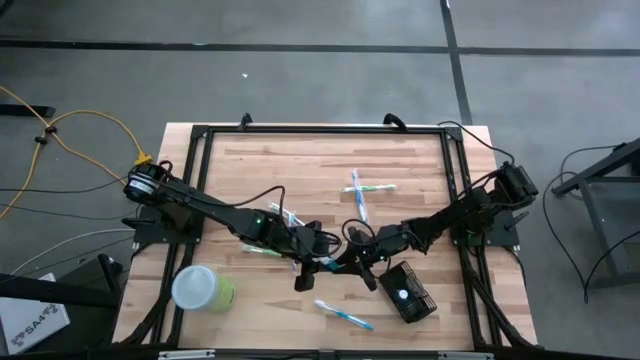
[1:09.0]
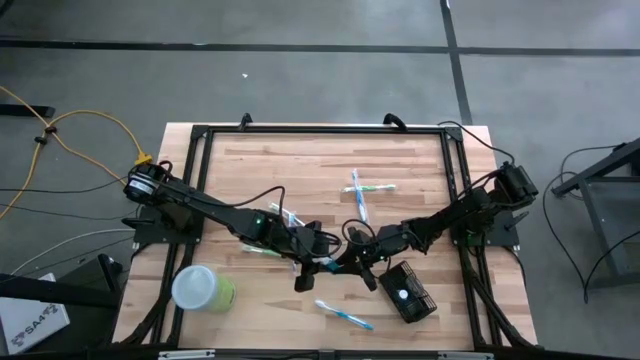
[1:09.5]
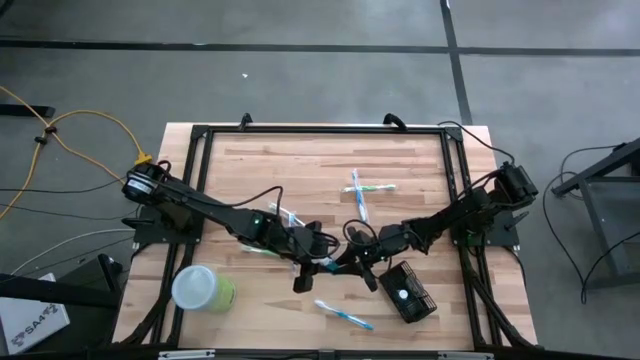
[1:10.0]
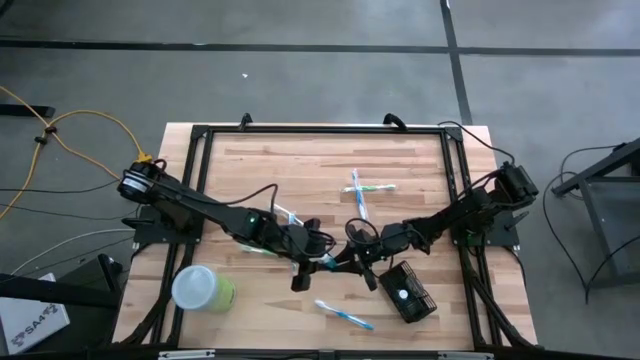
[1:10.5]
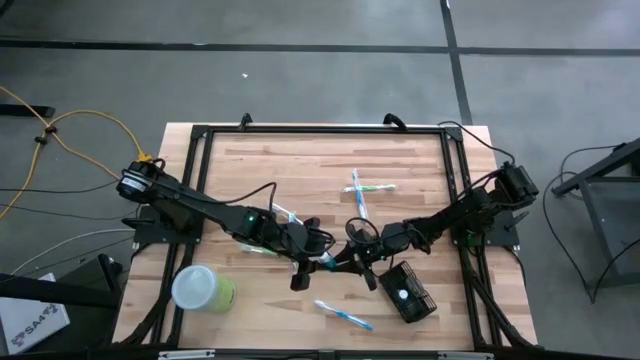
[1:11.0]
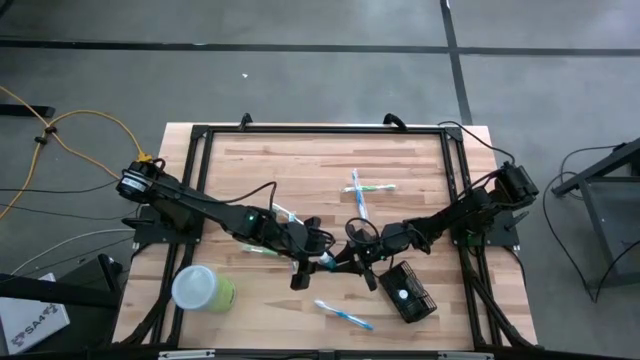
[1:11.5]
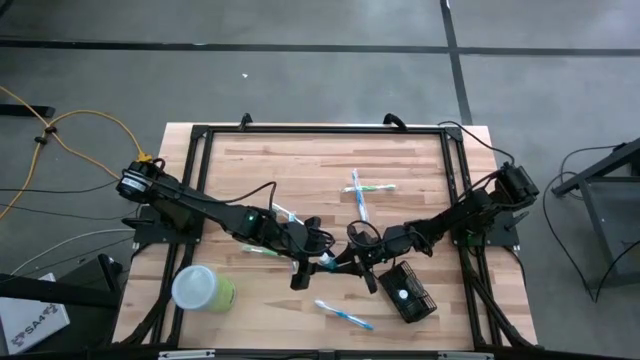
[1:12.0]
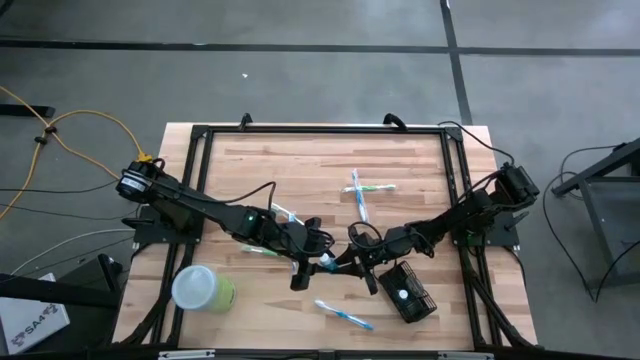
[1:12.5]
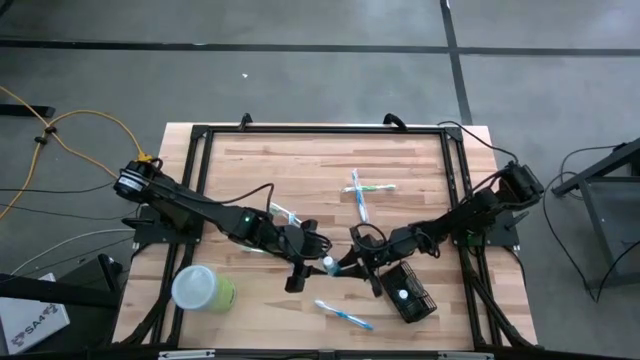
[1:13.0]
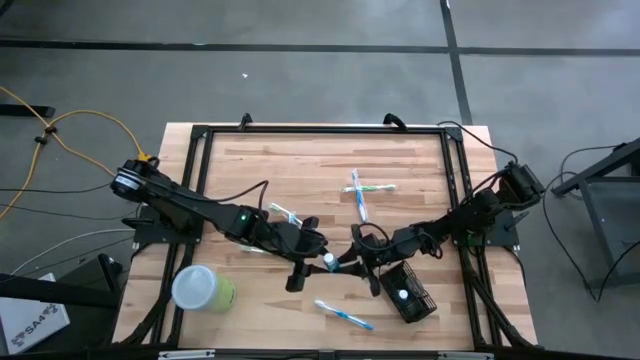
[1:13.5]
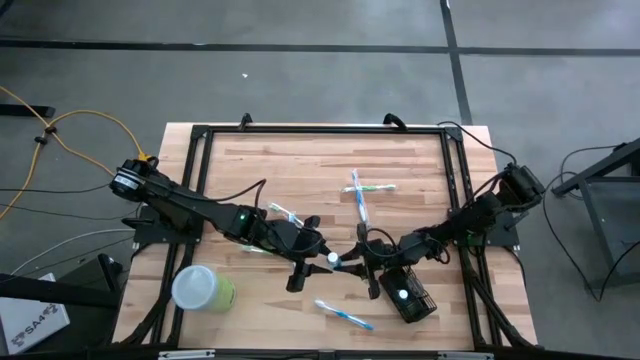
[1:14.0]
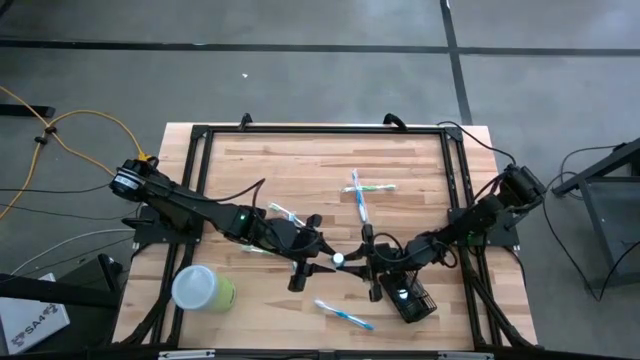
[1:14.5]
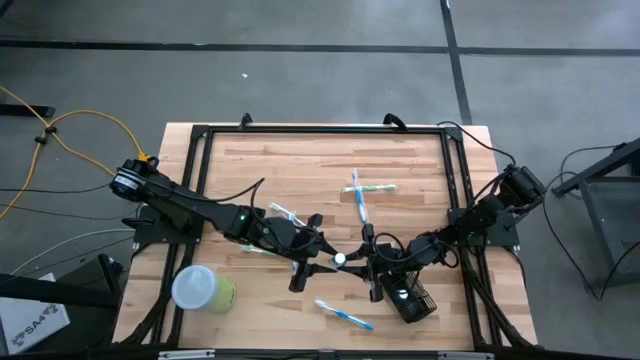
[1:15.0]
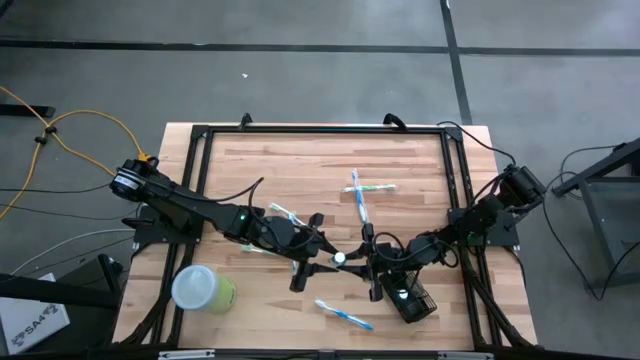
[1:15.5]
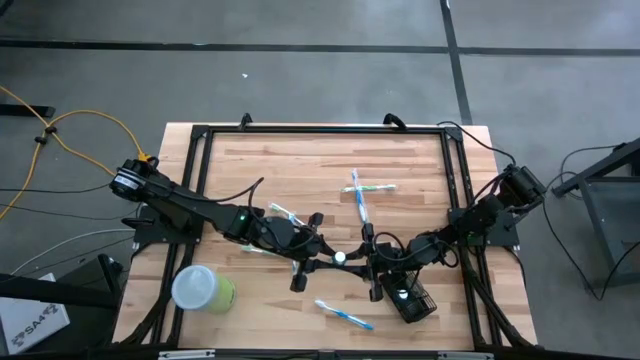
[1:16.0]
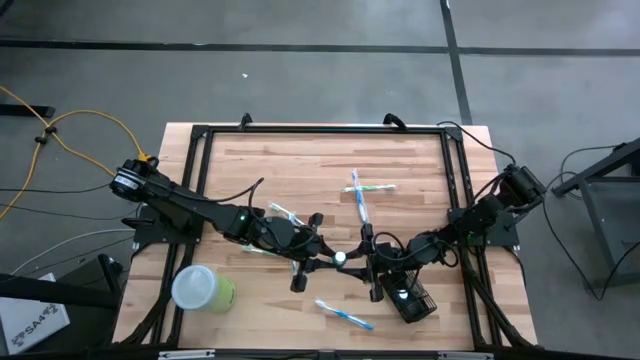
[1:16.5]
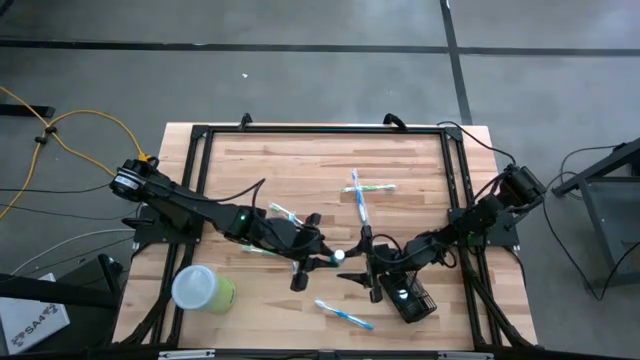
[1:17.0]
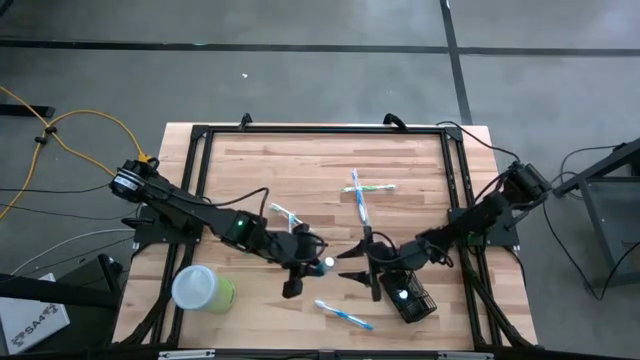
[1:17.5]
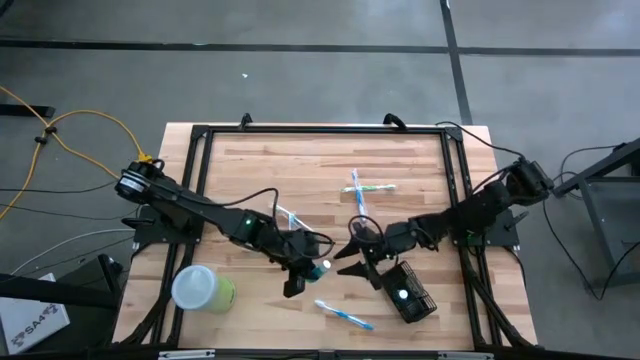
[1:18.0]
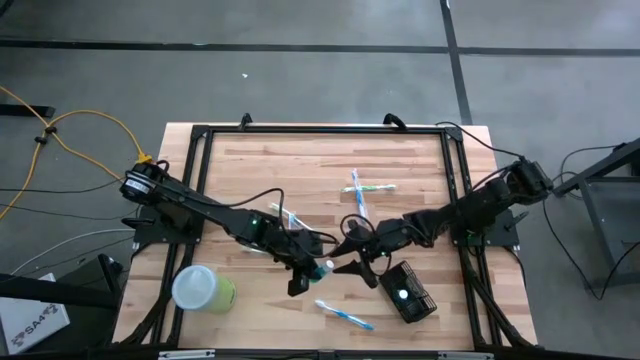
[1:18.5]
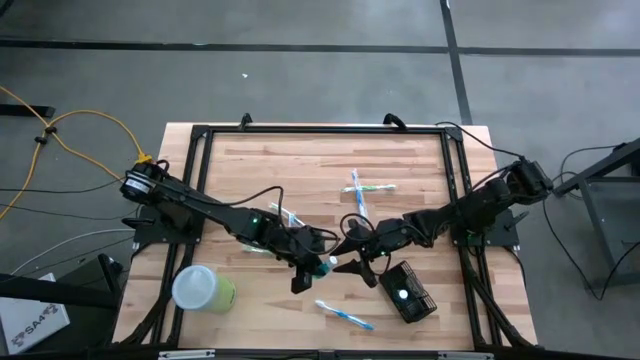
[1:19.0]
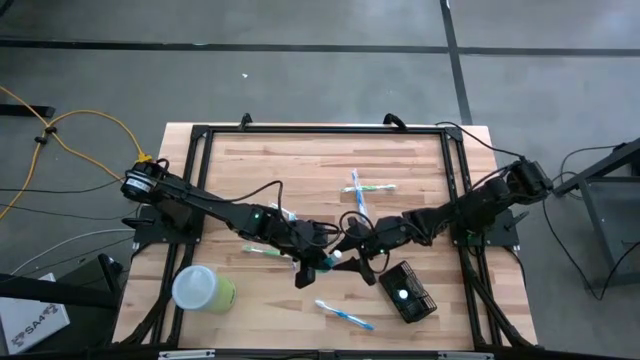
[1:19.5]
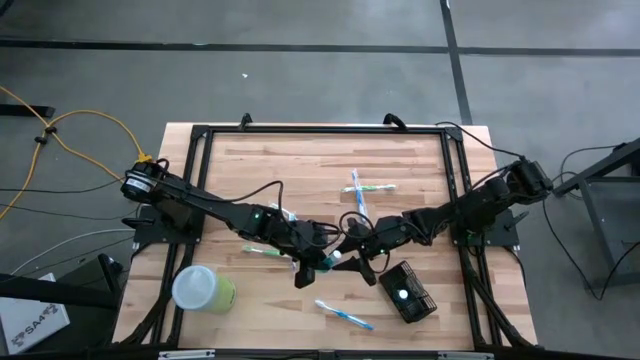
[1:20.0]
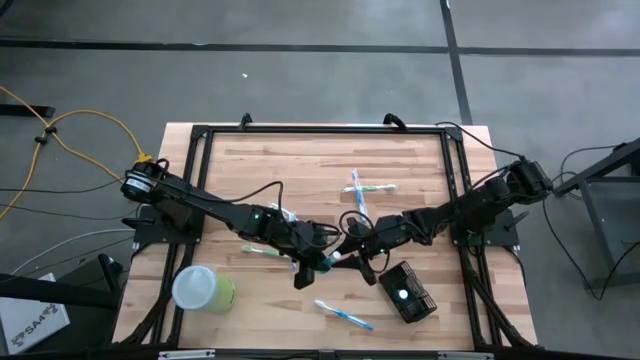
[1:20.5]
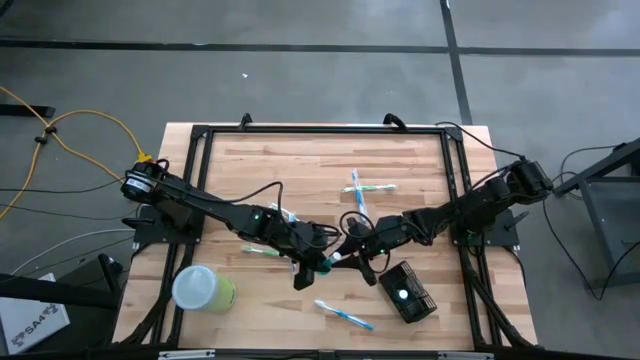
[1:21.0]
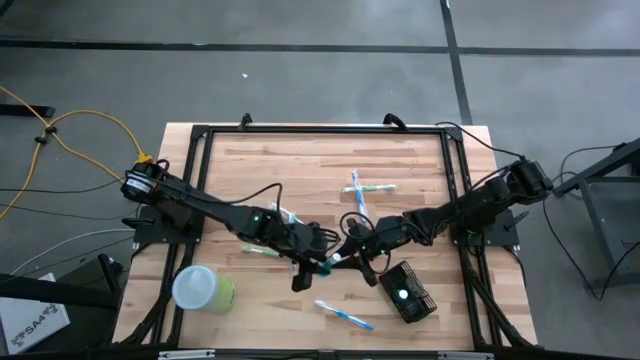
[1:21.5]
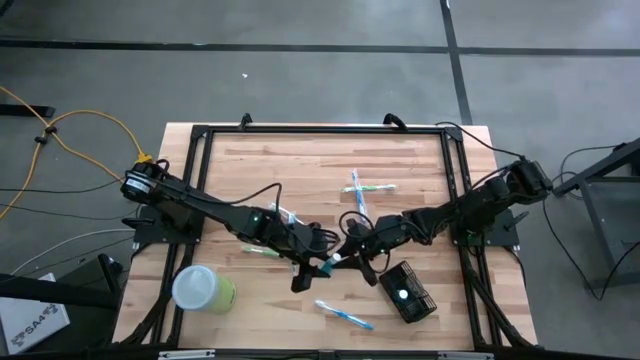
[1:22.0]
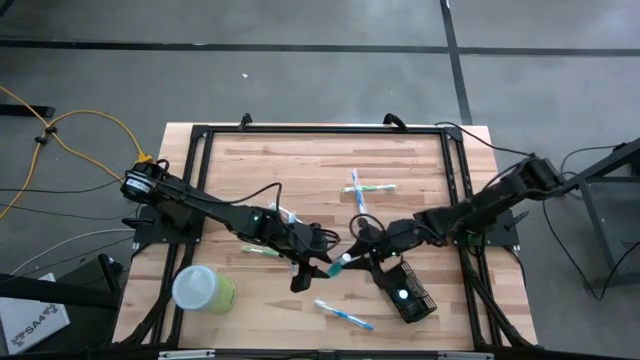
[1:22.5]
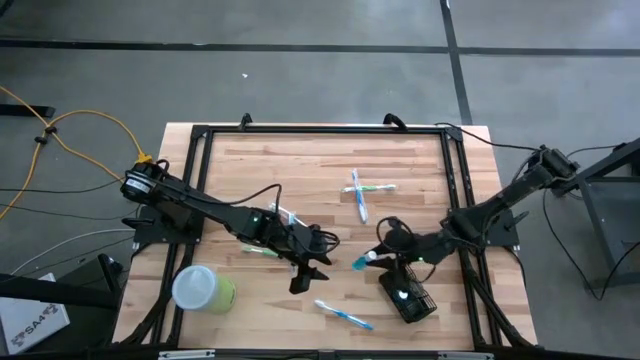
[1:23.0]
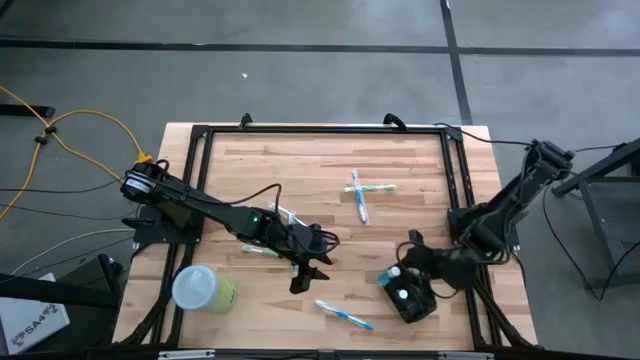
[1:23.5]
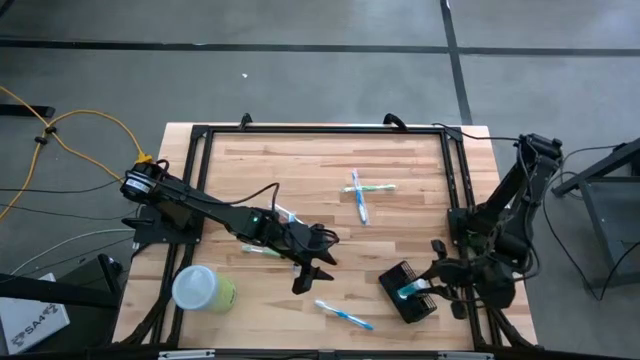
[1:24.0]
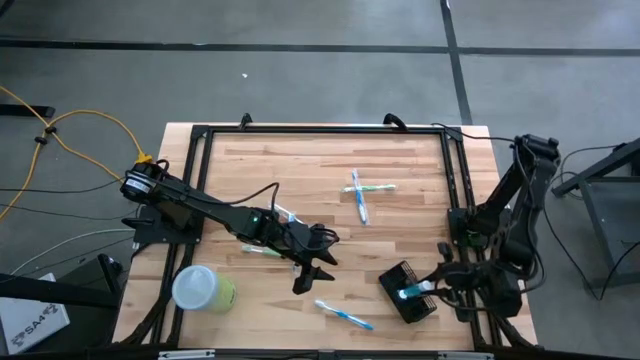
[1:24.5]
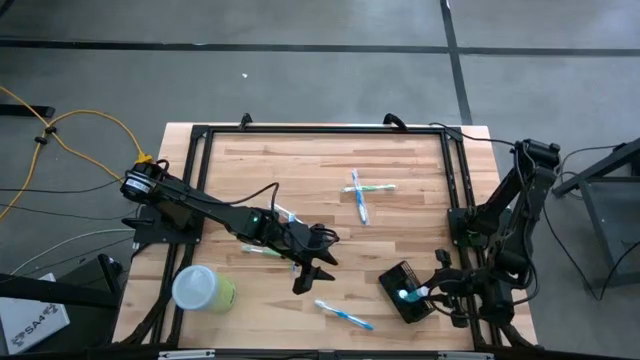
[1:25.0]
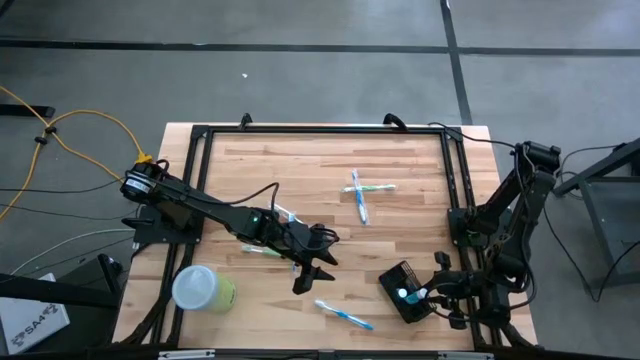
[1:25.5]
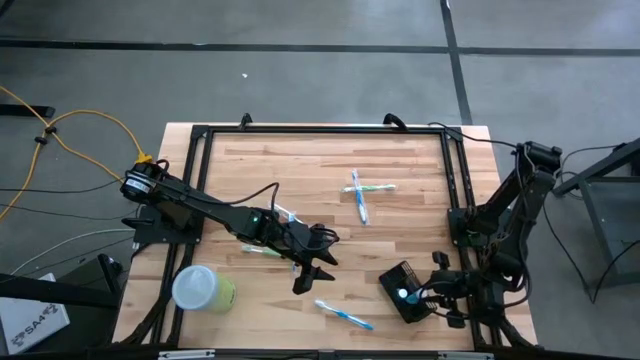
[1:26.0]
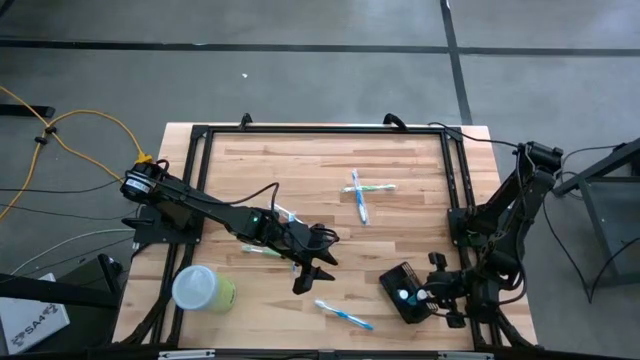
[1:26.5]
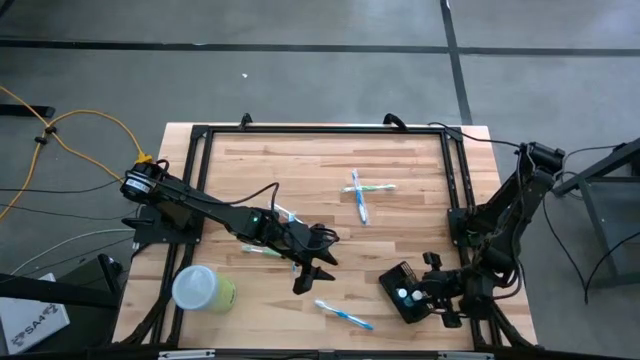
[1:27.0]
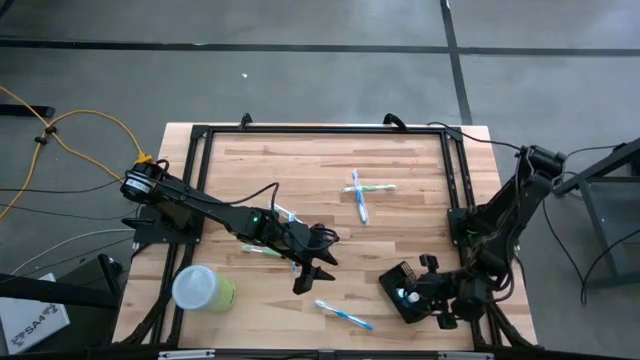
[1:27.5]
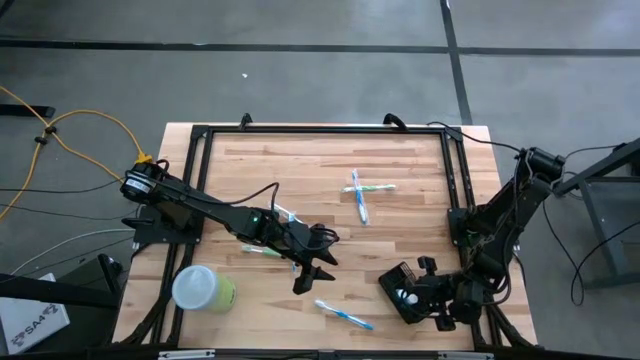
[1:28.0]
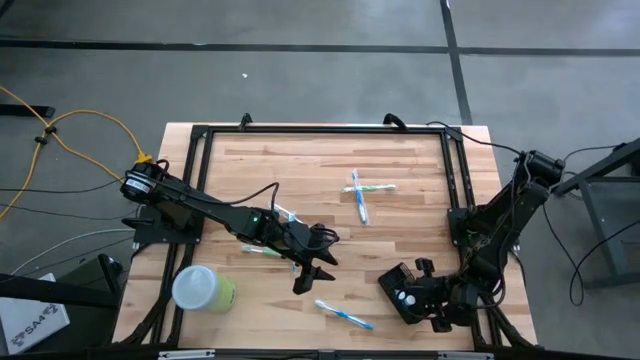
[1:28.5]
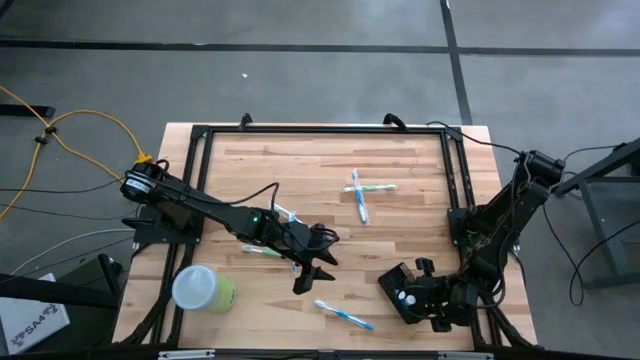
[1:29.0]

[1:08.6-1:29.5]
Task: Pick & Place toothbrushing station
Put the blue mouthwash into the middle section of the black wire organizer
